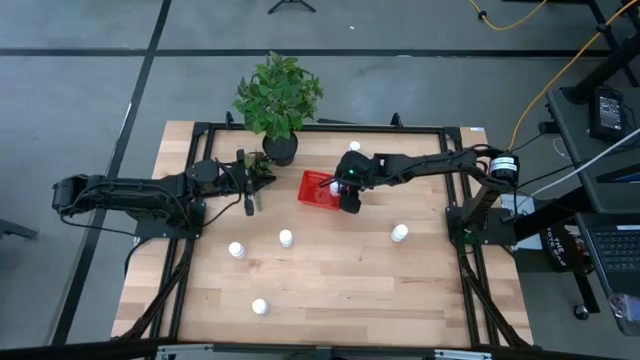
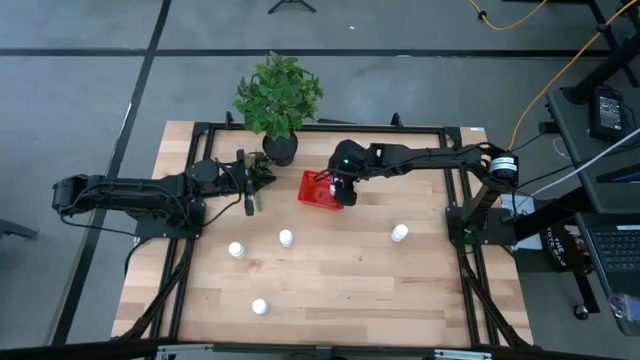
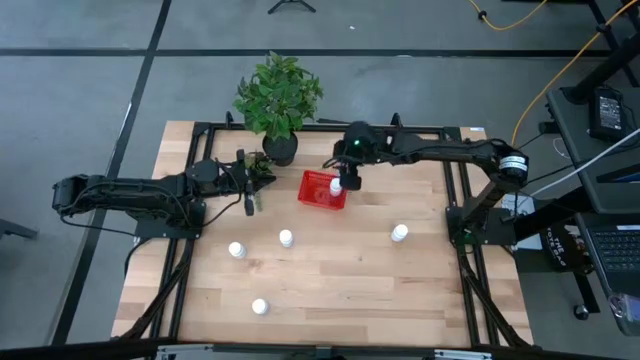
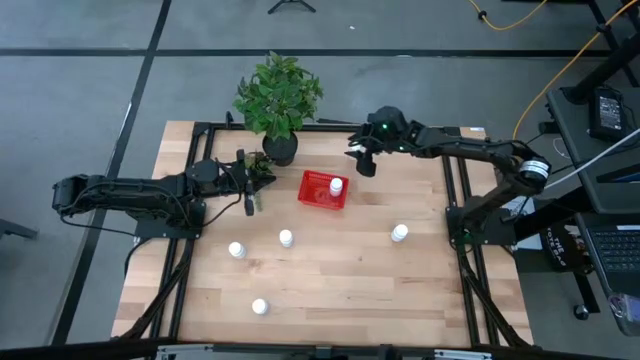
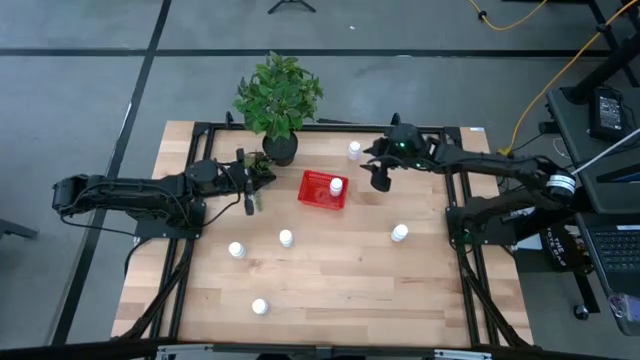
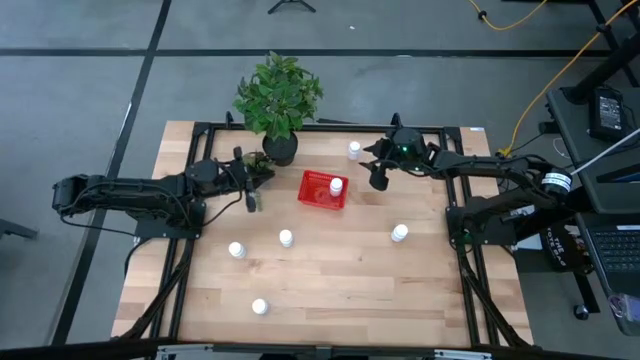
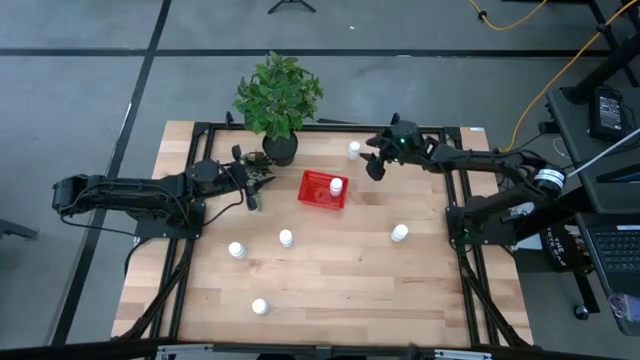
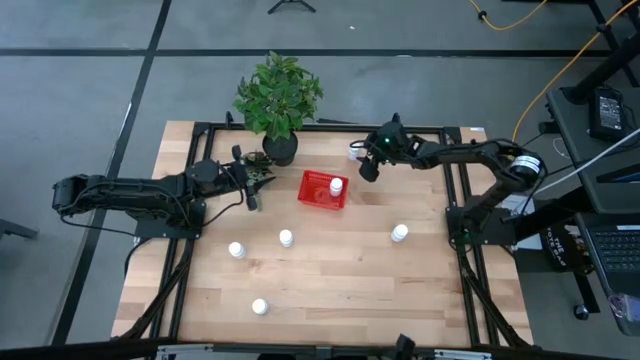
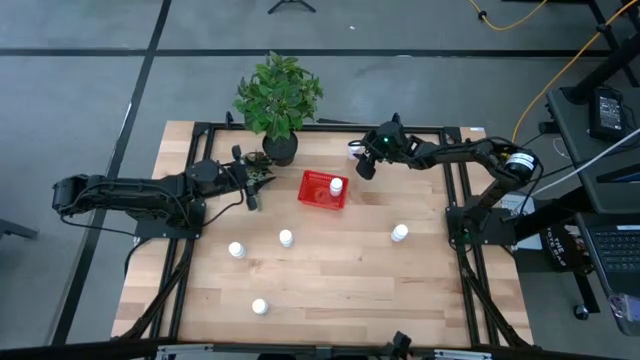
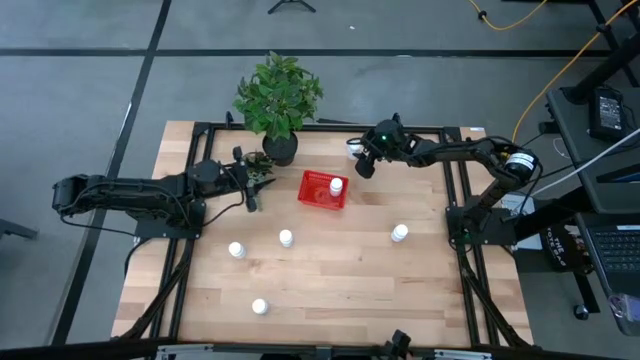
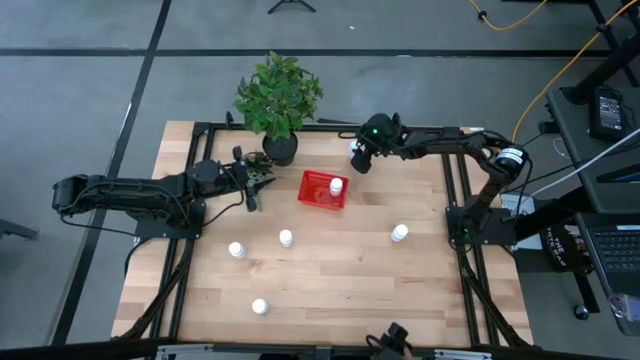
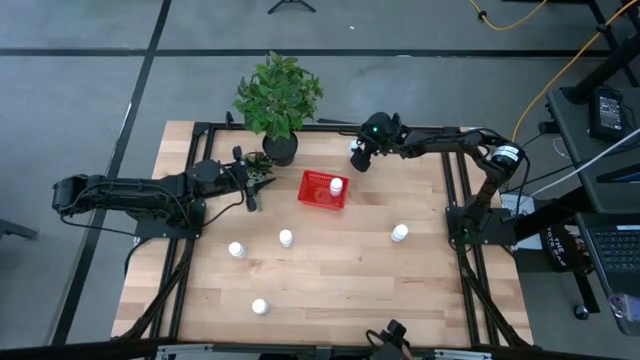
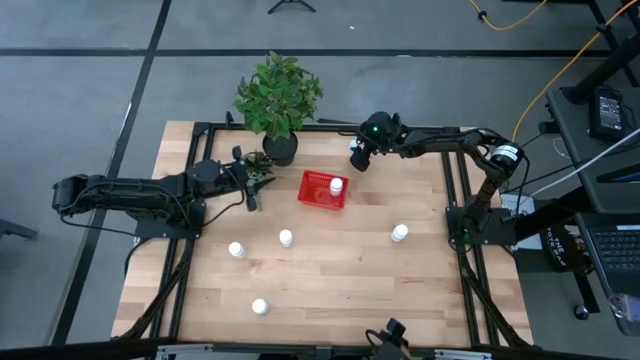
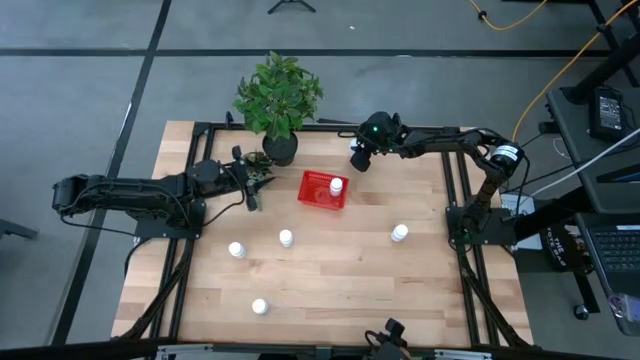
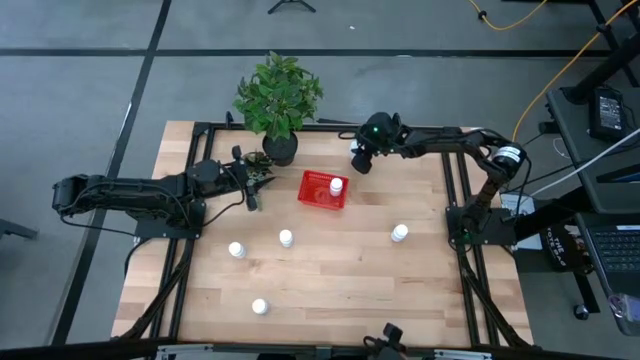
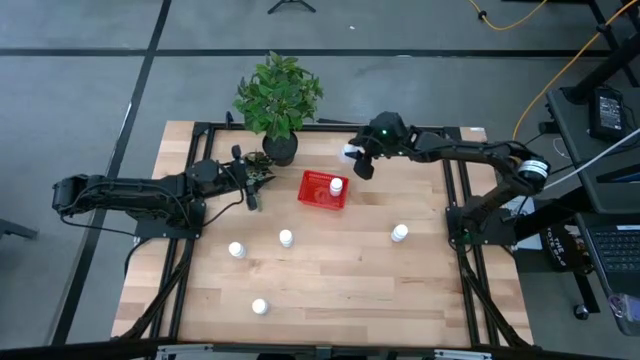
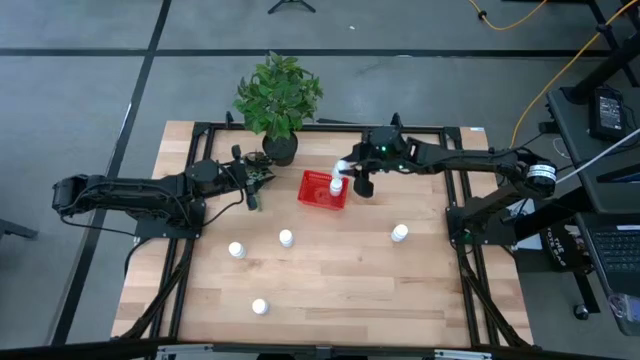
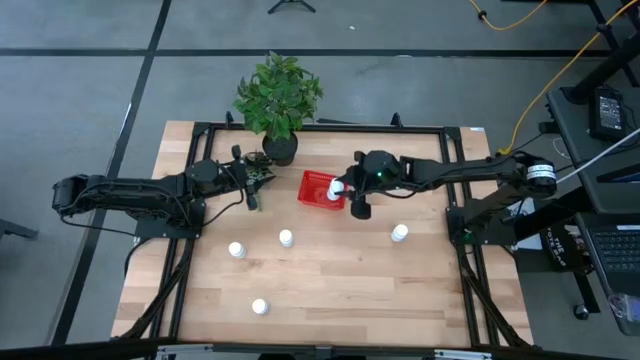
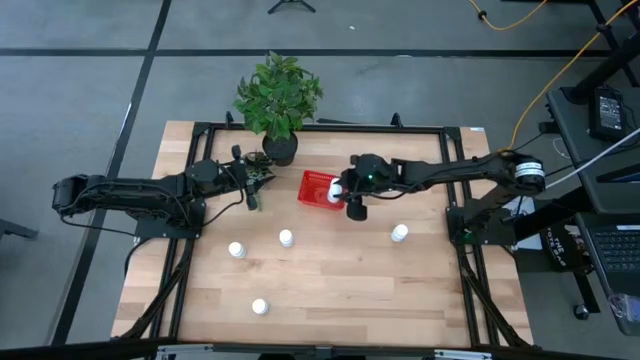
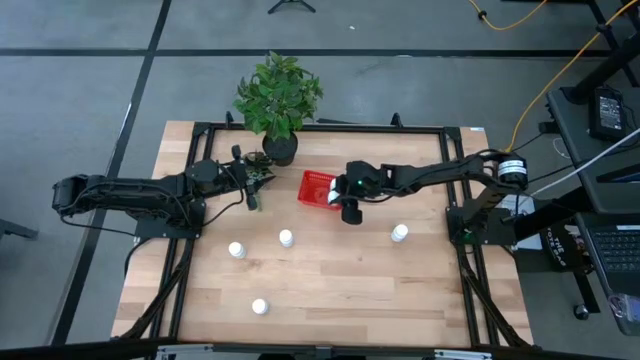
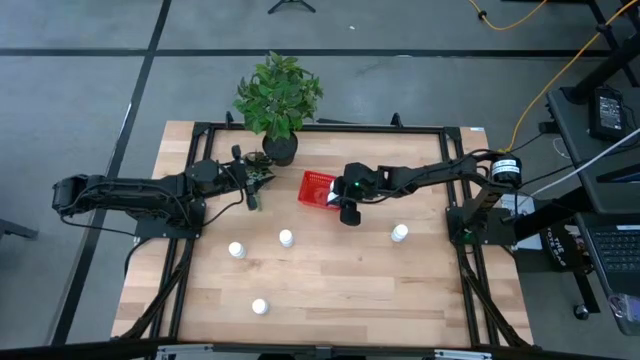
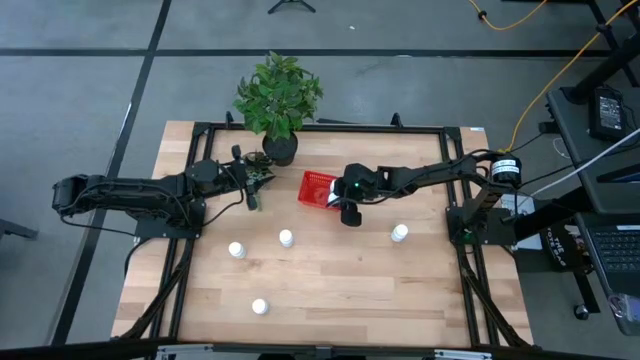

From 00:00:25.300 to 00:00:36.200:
Task: Pick and place pill bottles into a basket
Put the white medicine bottle into the red bin

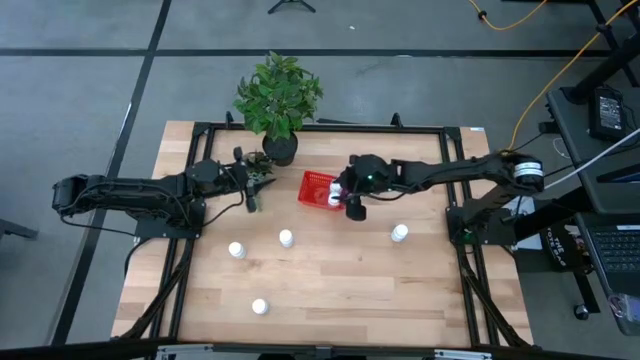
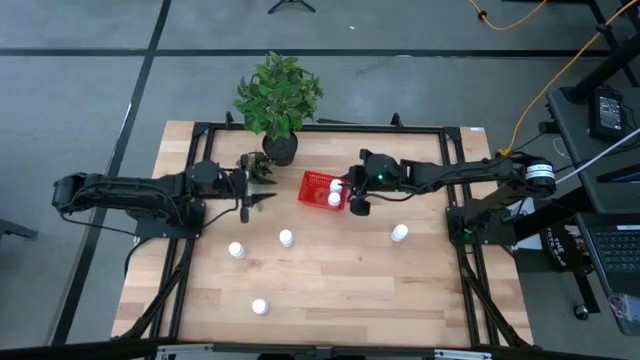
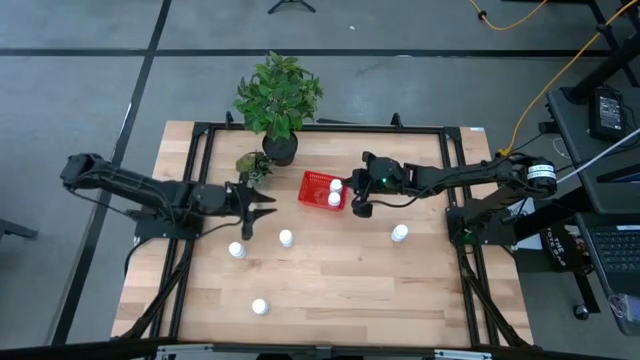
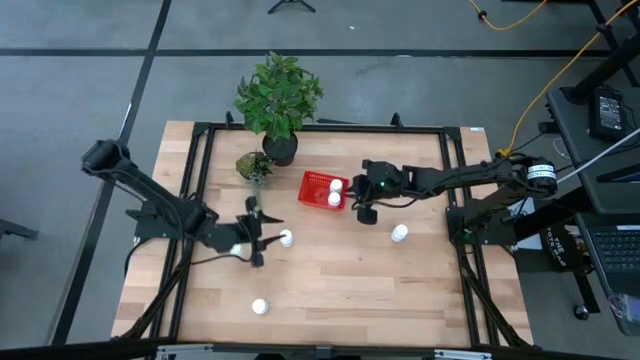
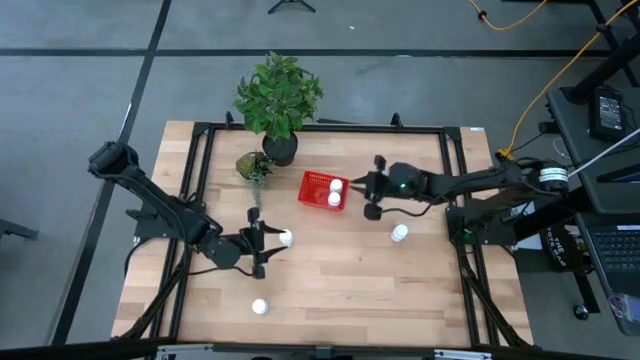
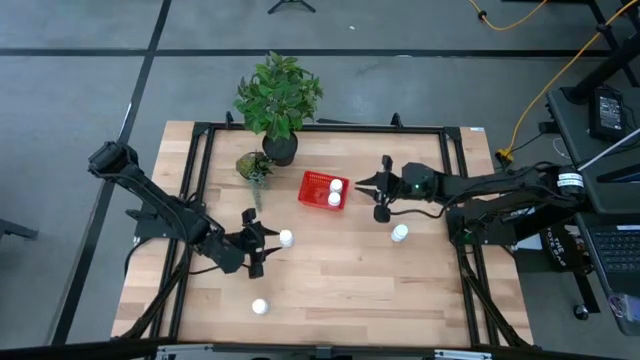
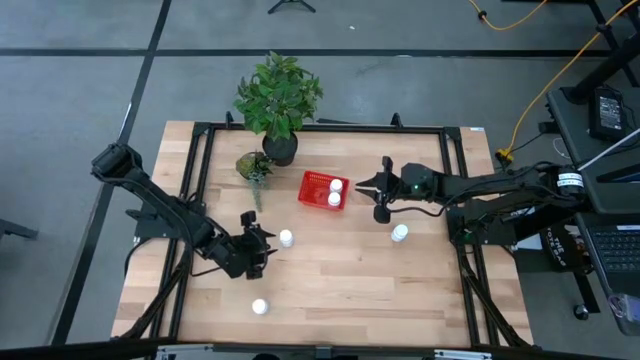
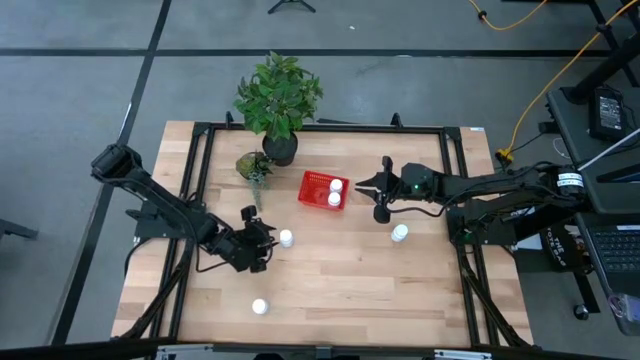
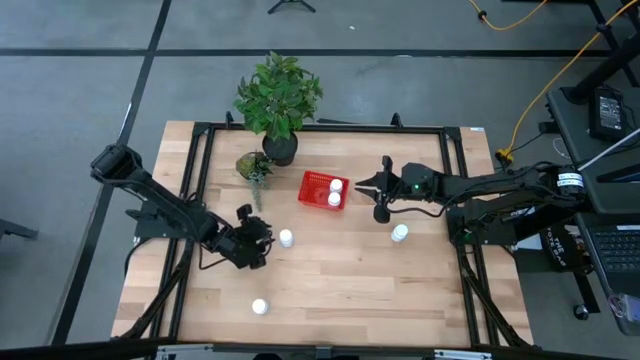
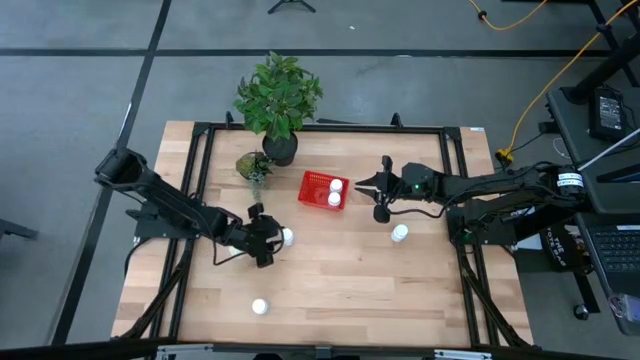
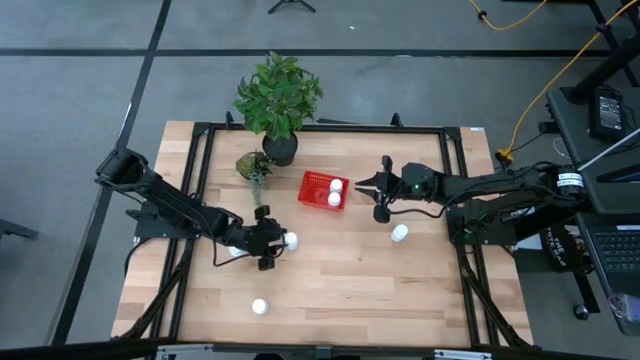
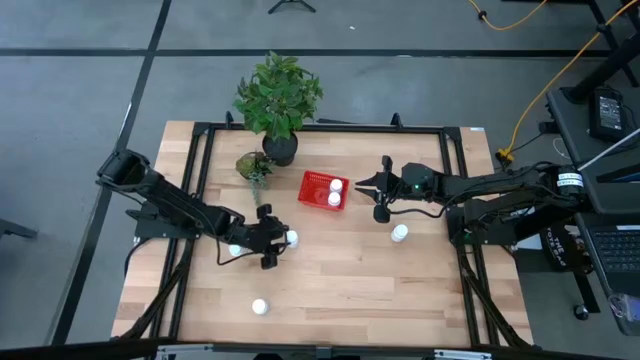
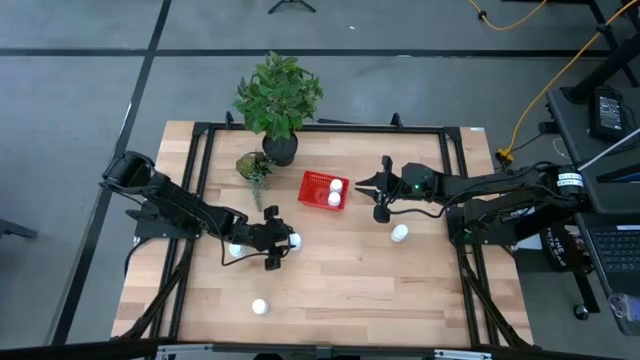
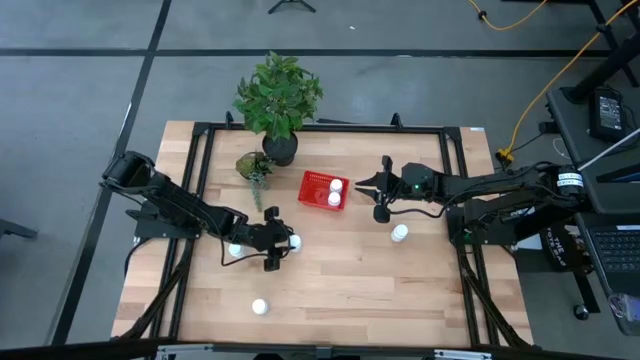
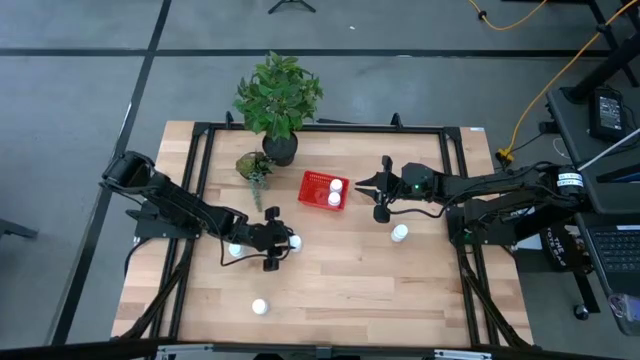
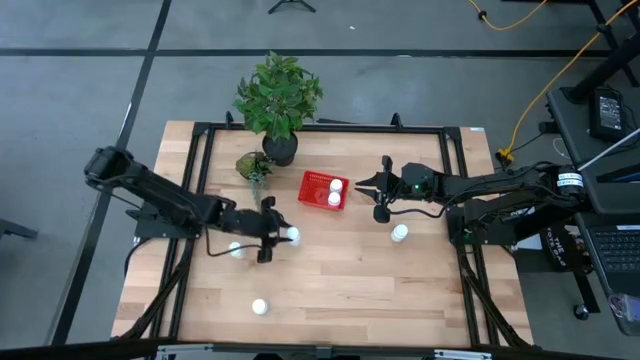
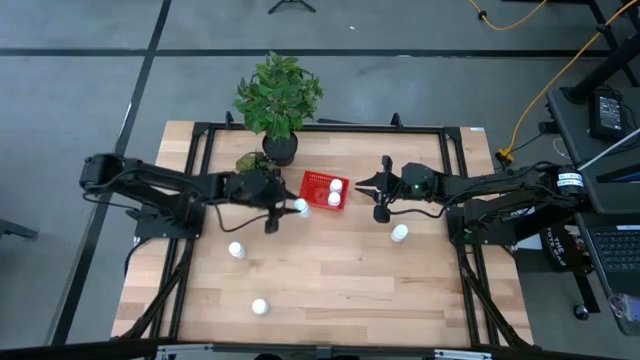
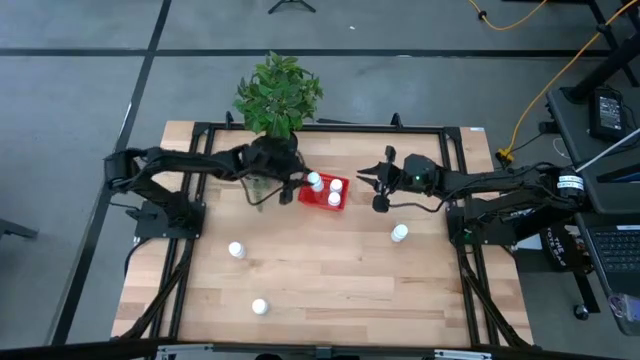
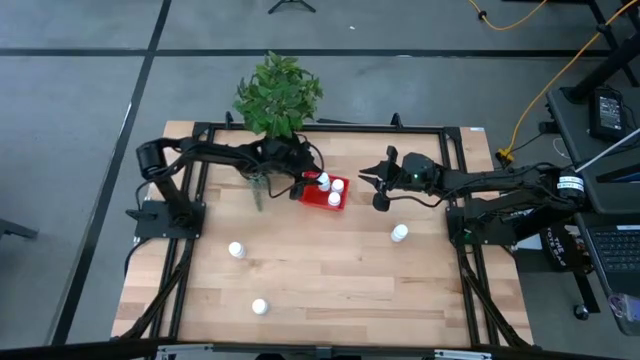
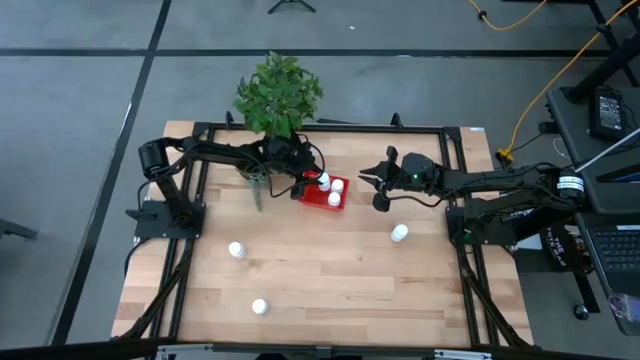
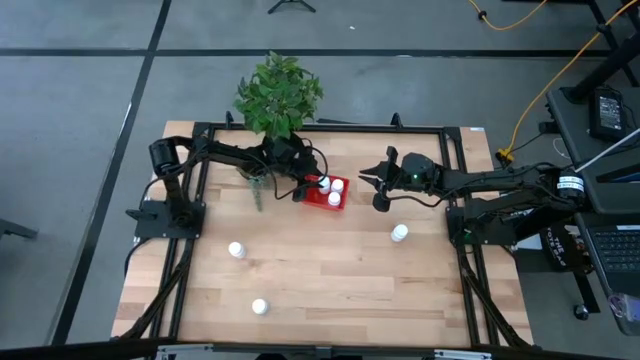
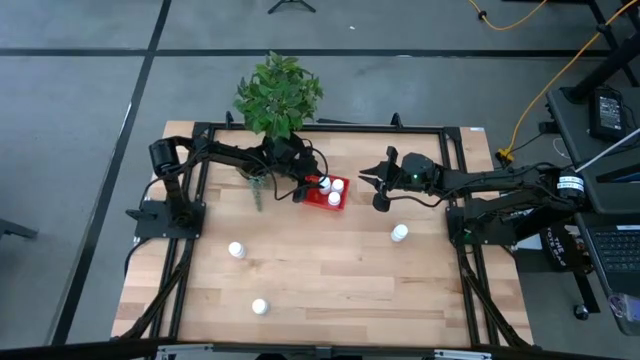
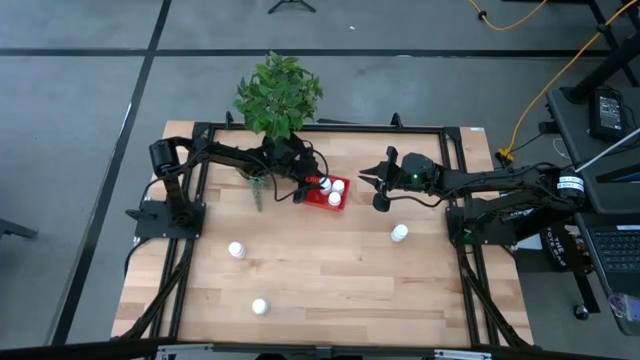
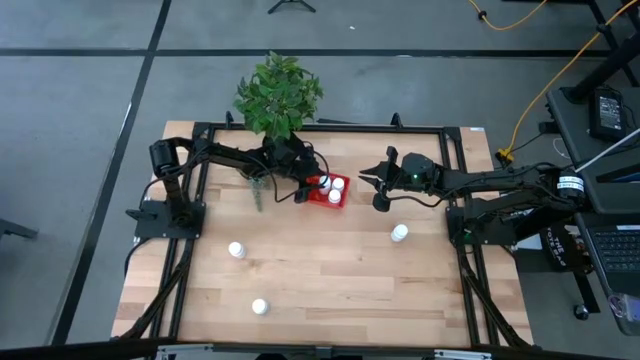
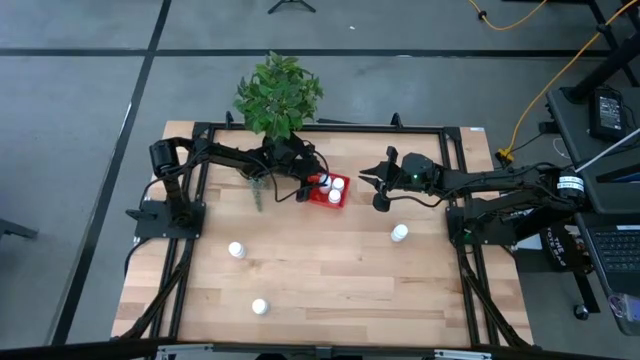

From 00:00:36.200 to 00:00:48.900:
Put the white medicine bottle into the red bin
